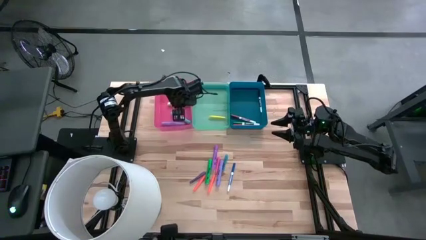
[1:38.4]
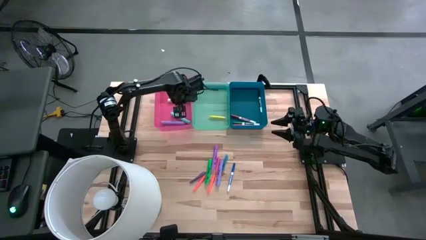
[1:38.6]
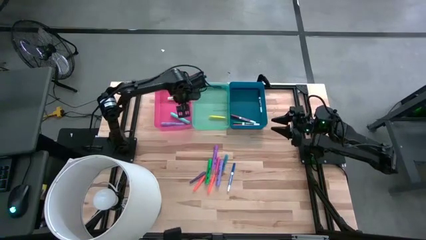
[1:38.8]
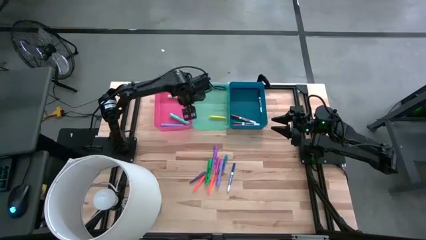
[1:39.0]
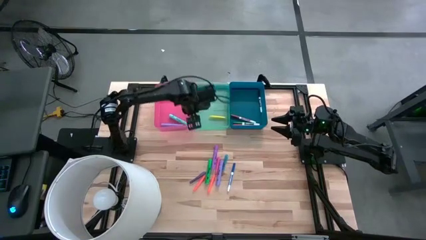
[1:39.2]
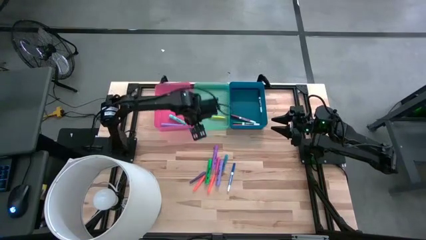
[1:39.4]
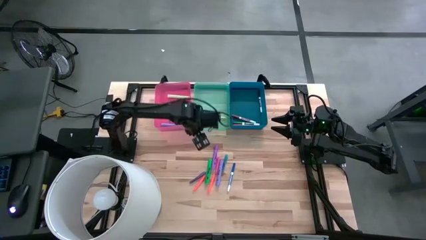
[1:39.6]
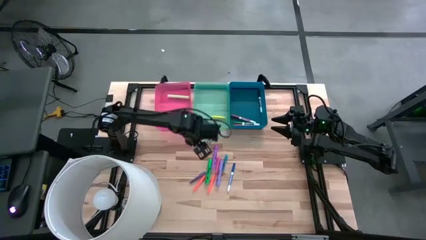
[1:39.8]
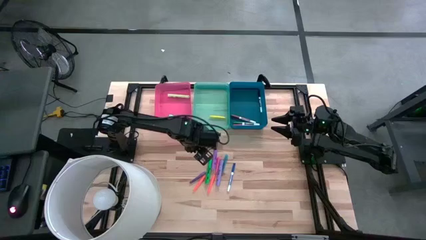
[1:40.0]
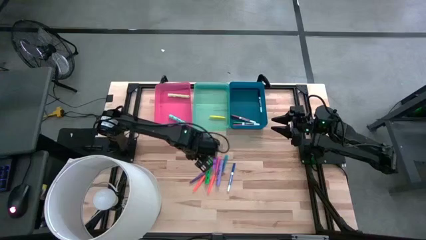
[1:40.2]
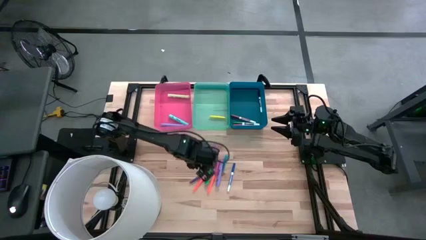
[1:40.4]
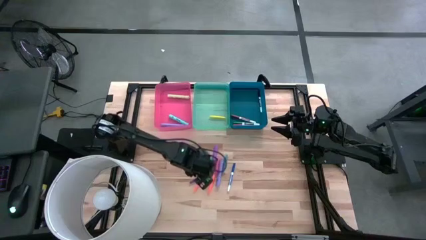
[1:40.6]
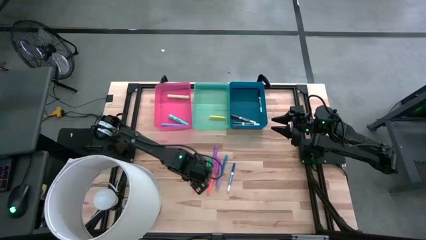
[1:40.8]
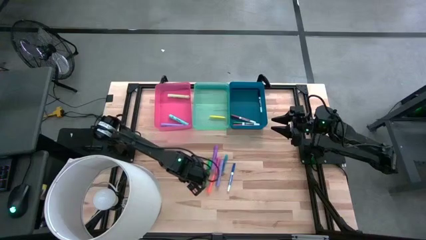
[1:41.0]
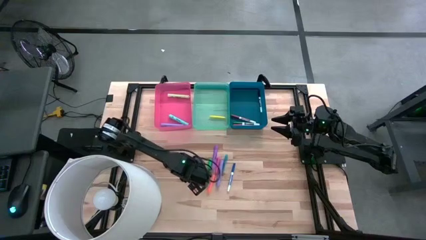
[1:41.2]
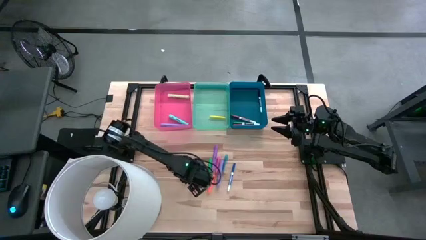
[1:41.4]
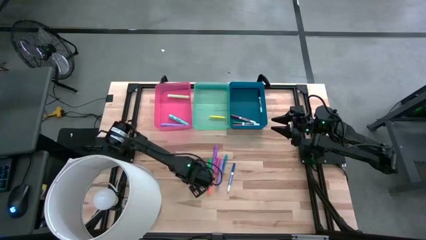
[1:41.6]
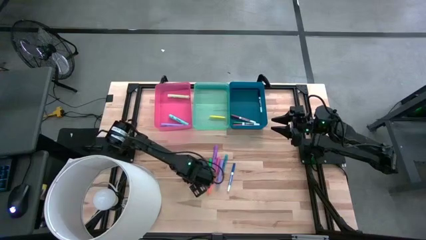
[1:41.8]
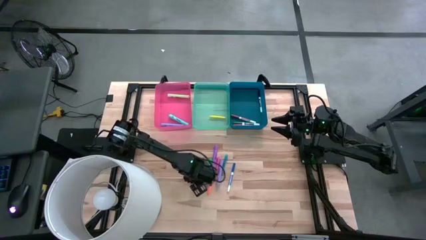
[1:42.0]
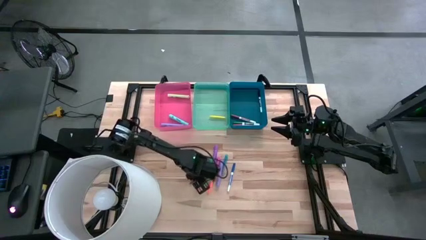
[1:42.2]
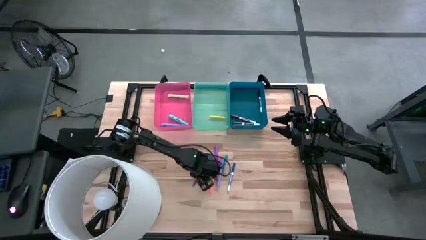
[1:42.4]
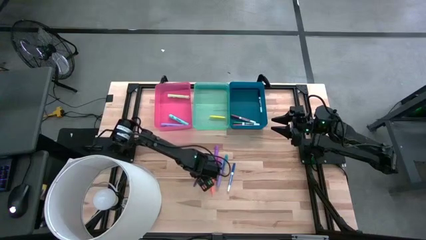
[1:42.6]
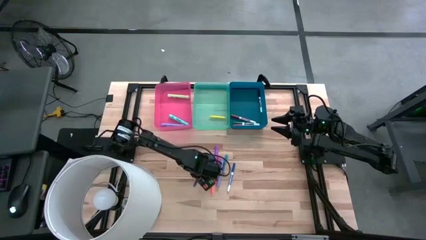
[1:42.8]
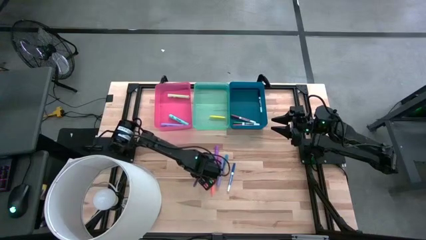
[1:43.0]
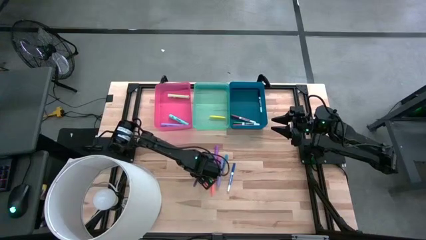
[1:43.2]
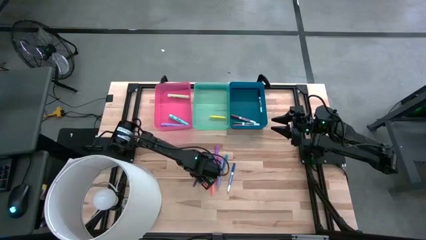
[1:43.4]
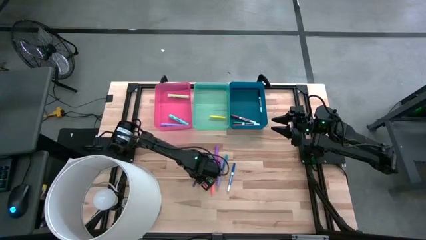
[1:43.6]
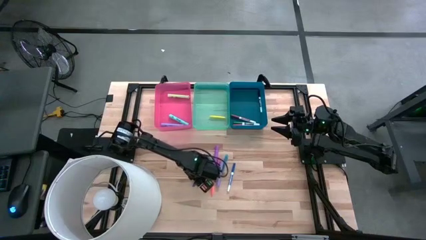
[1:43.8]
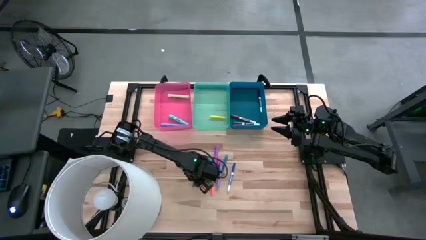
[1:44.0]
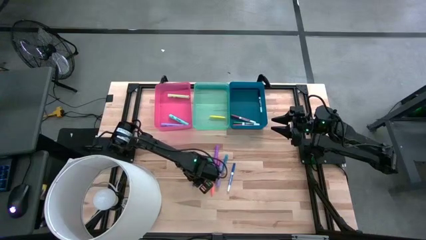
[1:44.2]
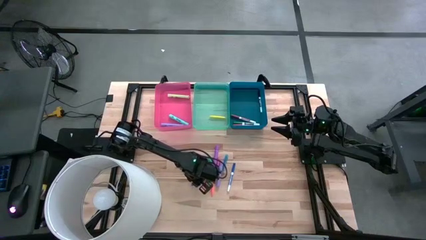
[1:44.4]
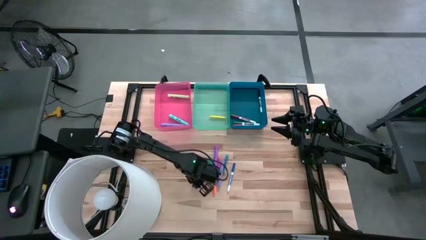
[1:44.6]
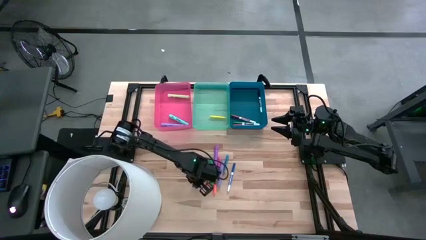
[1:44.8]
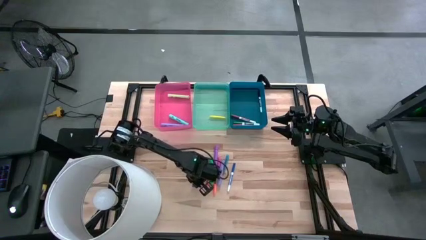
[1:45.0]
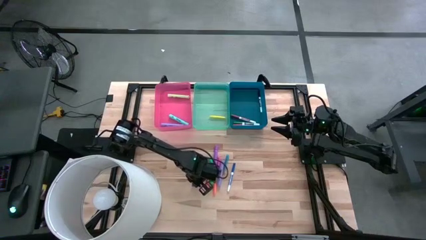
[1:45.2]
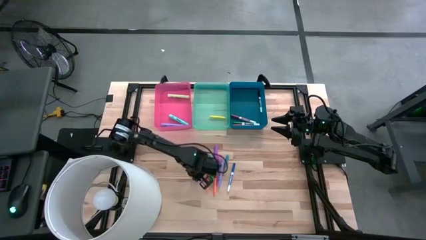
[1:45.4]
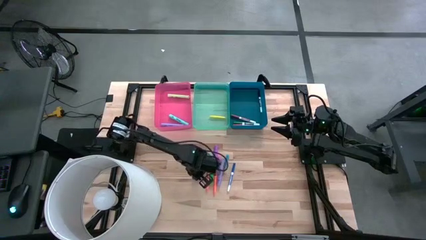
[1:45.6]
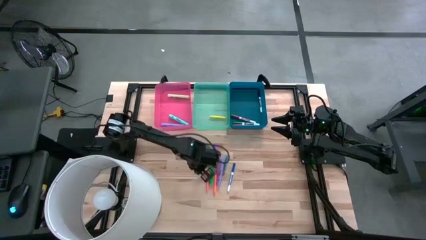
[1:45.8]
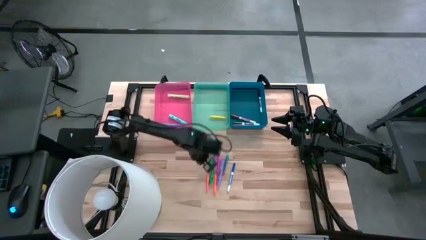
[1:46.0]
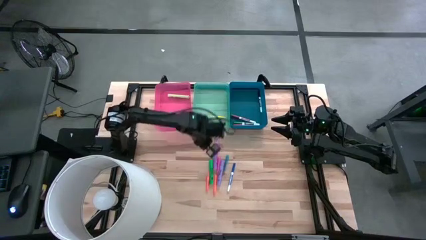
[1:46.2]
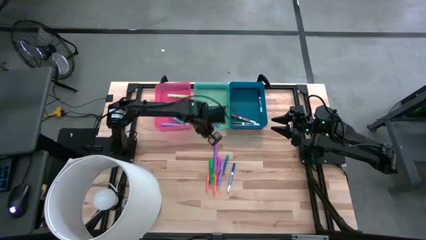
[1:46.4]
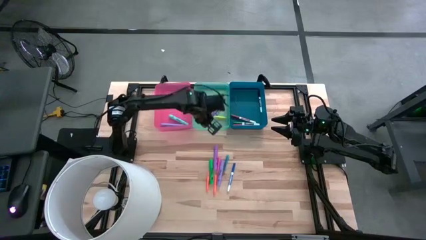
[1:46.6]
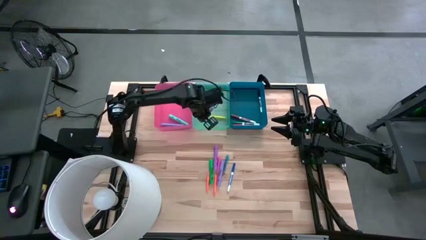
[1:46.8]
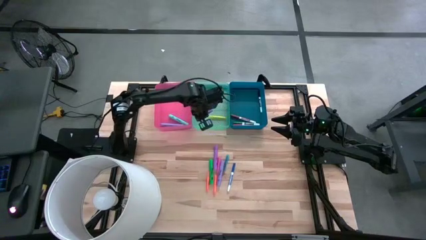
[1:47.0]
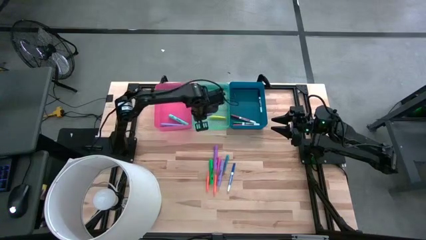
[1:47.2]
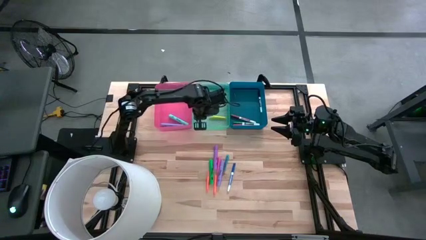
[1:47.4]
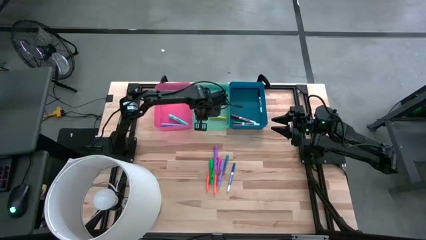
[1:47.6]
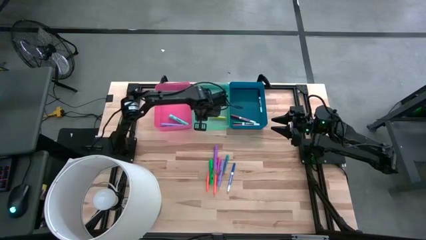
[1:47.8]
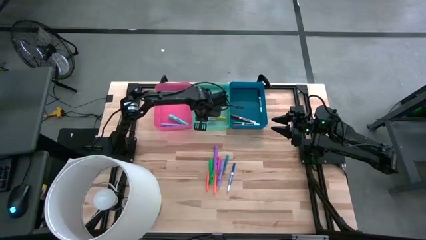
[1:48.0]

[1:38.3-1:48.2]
Task: Pick & Place Markers
Put the purple pen into the green bin

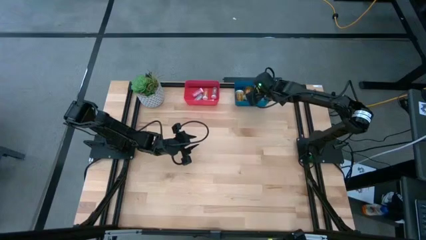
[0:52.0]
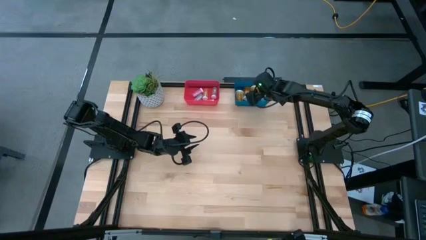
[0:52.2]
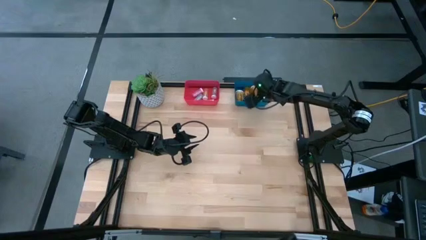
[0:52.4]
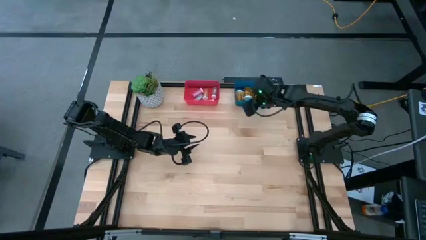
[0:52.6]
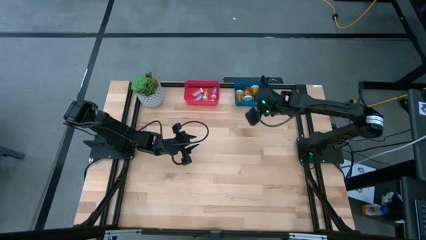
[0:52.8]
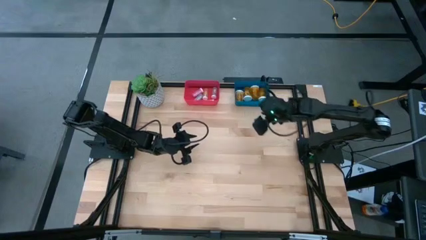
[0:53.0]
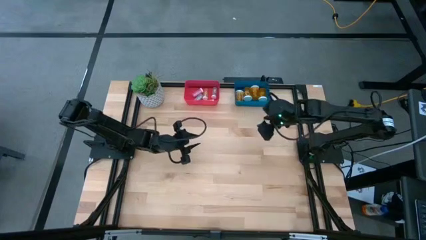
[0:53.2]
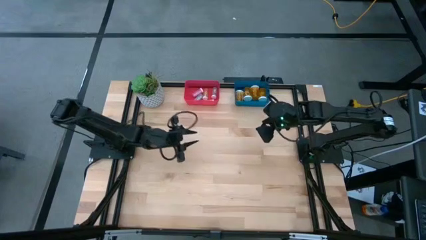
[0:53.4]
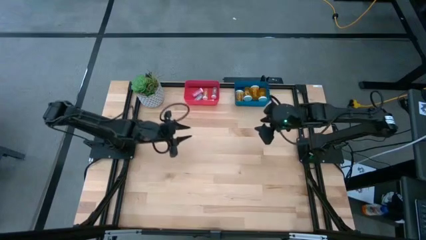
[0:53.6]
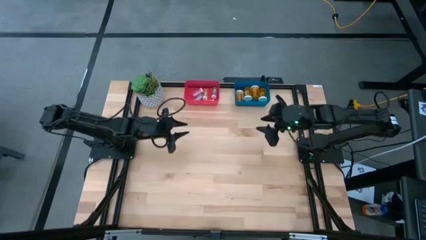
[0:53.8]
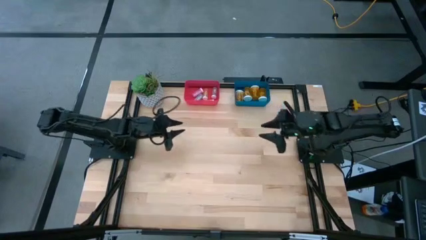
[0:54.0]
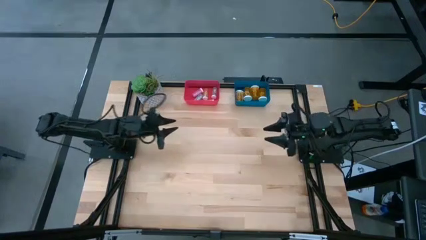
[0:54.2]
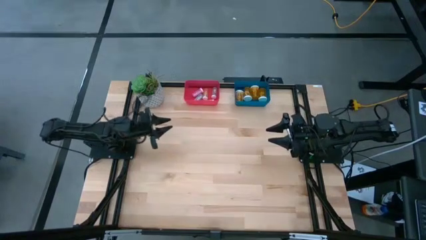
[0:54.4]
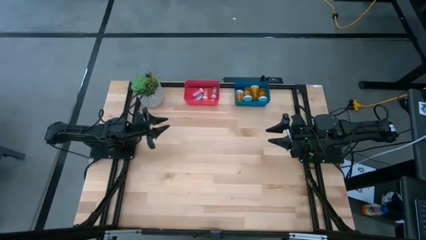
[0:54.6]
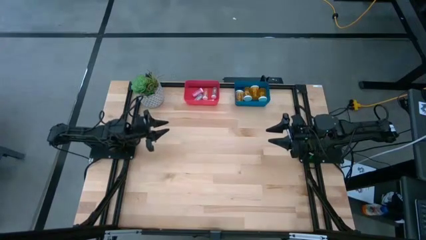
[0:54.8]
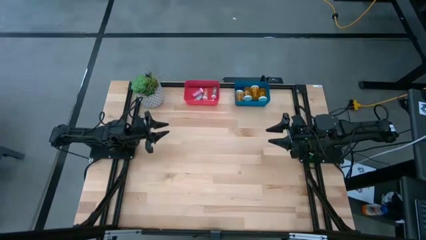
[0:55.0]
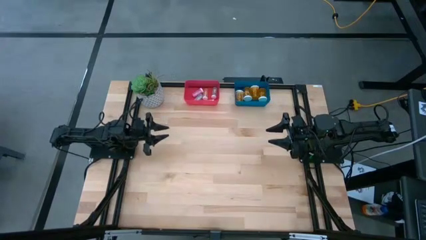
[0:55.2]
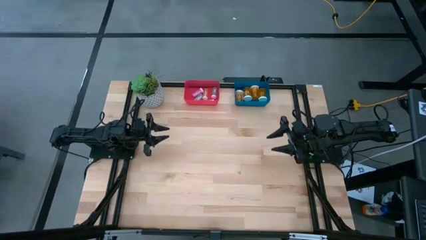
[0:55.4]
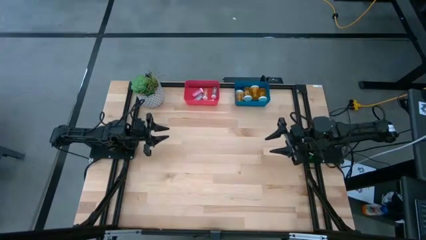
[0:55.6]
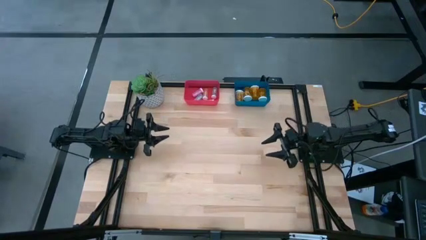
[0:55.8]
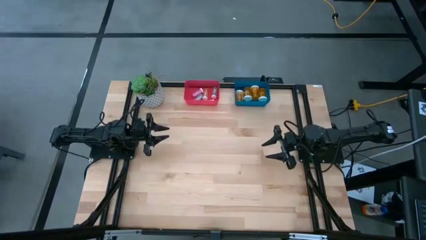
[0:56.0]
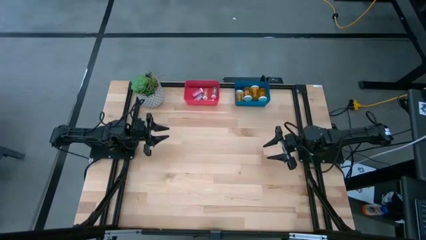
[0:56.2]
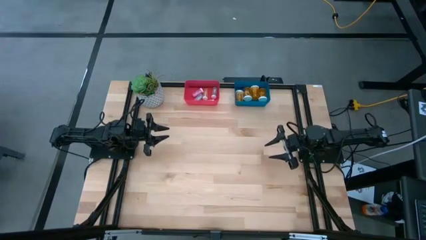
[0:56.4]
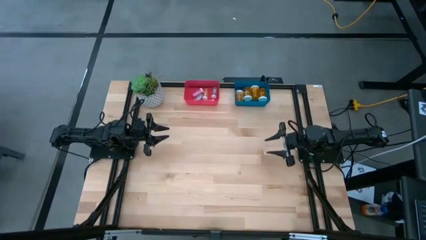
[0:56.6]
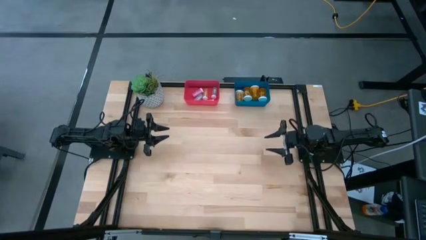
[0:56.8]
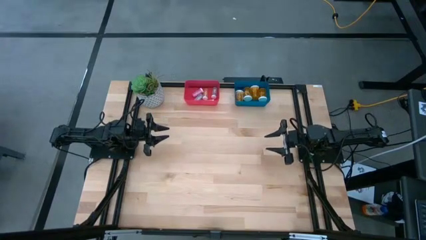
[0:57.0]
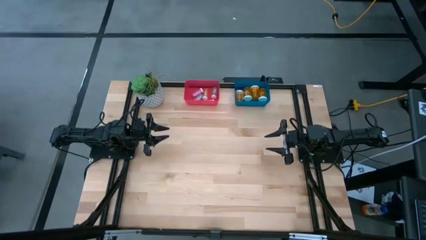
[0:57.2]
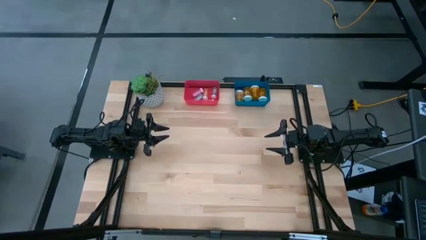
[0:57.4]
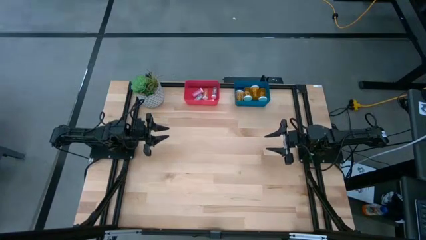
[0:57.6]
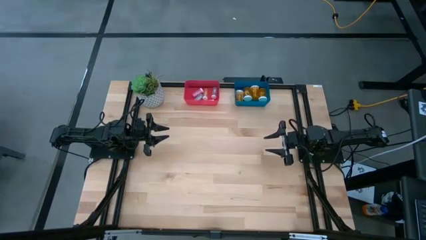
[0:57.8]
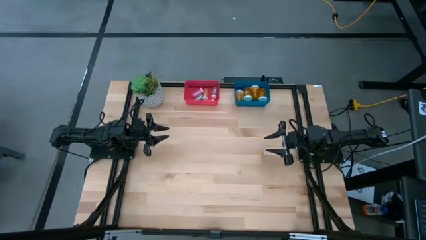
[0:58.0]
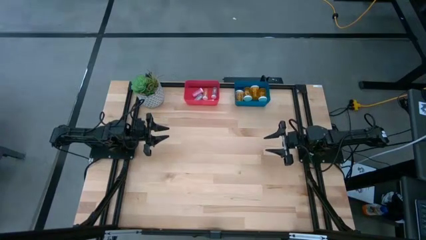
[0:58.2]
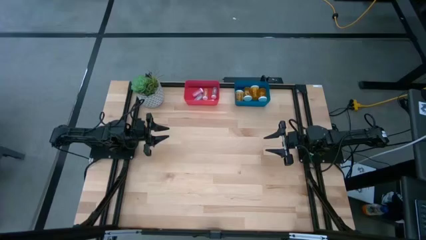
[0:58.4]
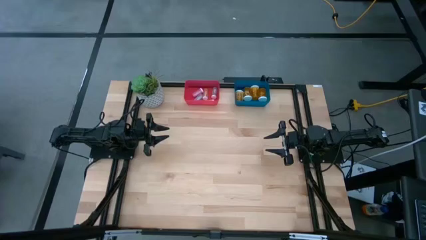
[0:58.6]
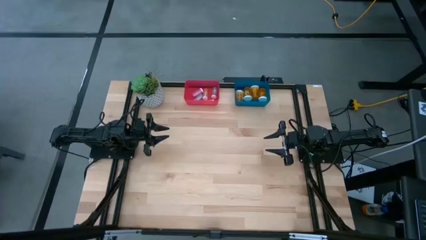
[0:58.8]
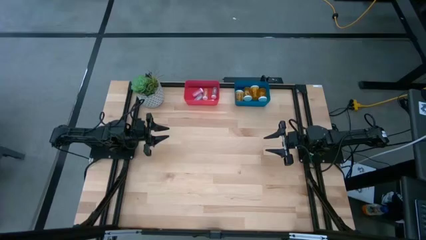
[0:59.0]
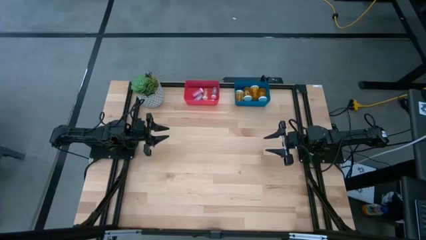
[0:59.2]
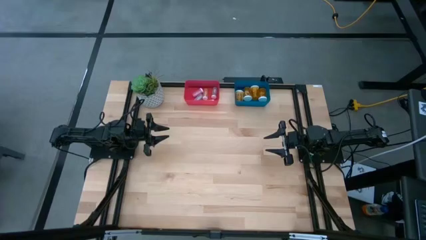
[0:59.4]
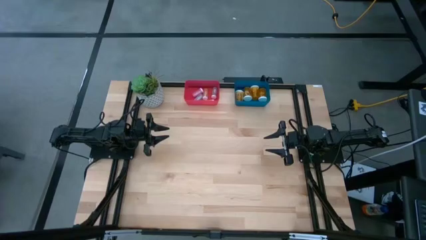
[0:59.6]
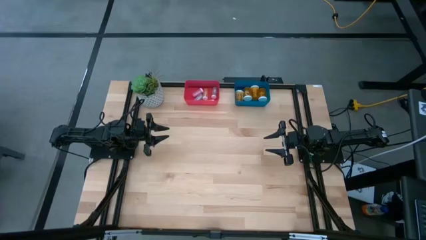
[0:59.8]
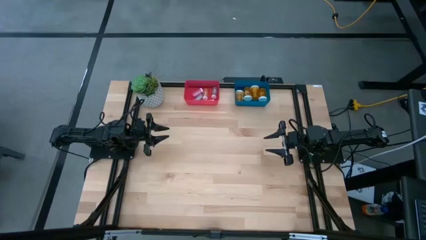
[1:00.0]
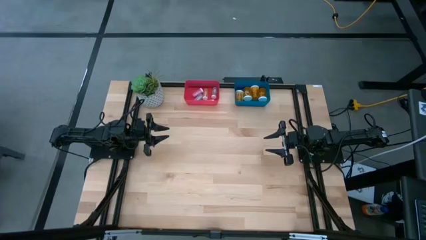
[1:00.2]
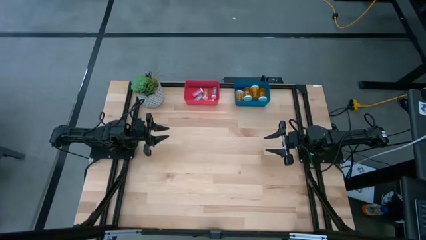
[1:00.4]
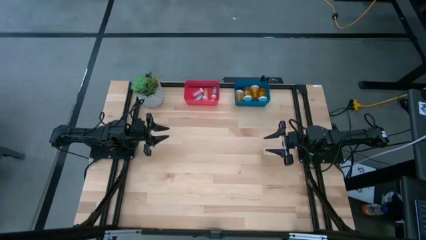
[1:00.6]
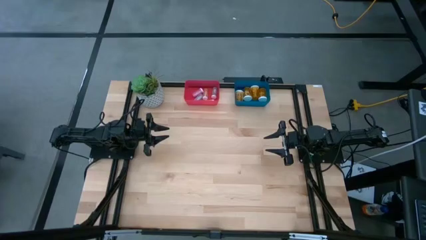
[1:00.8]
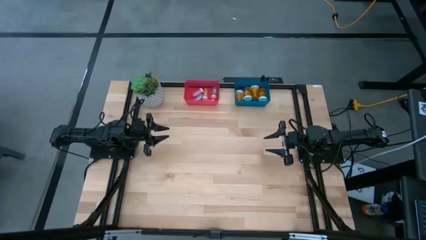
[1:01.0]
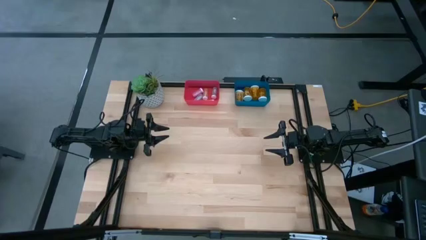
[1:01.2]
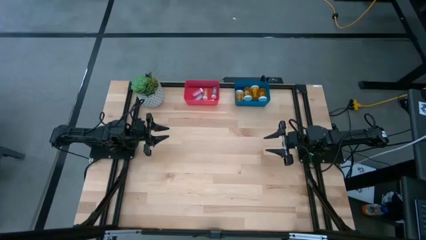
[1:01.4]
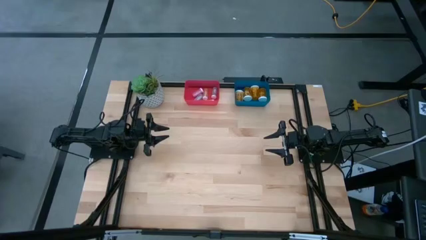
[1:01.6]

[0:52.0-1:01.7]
Task: Pick and place medicine bottles into bin by pill shape (circle, oval)
Return to Home Position
